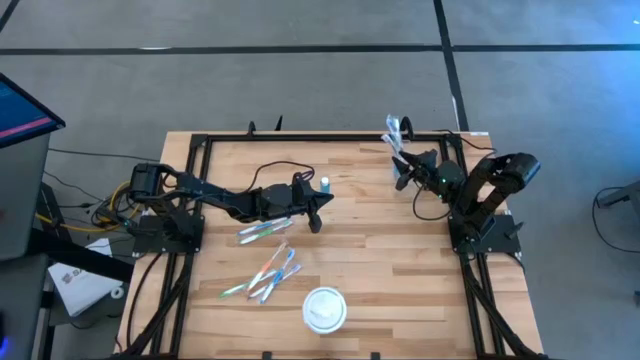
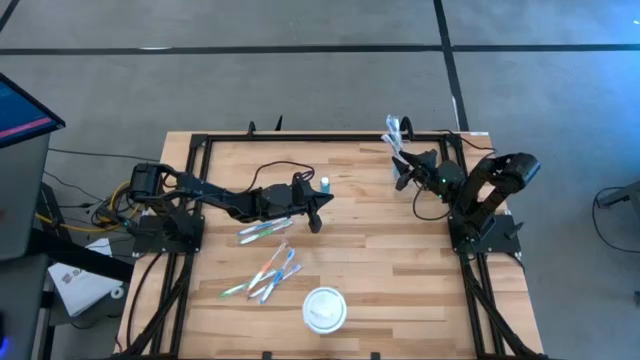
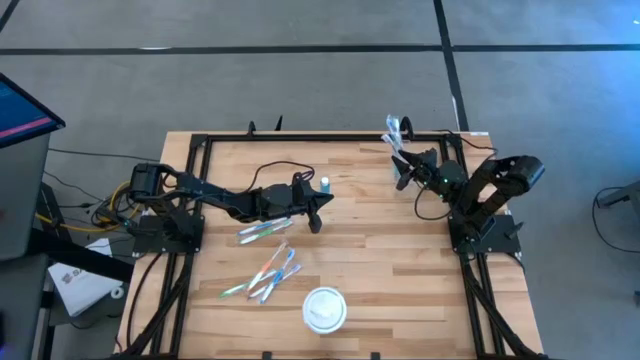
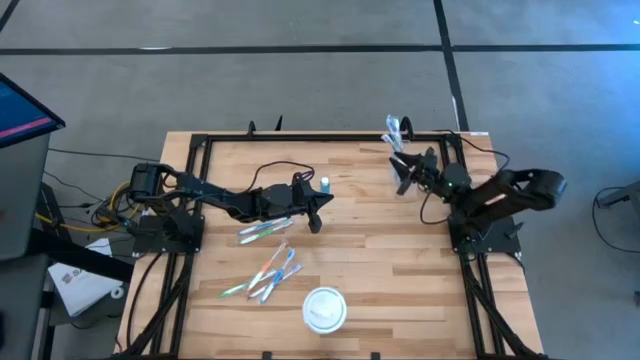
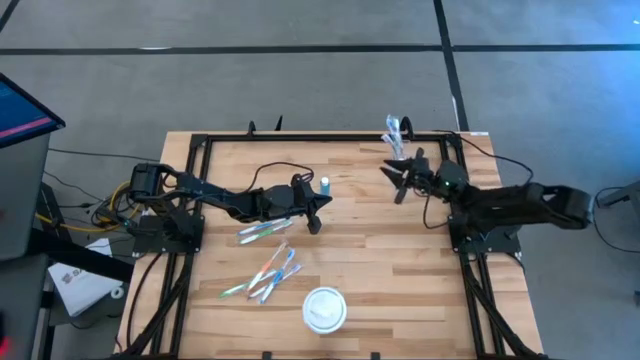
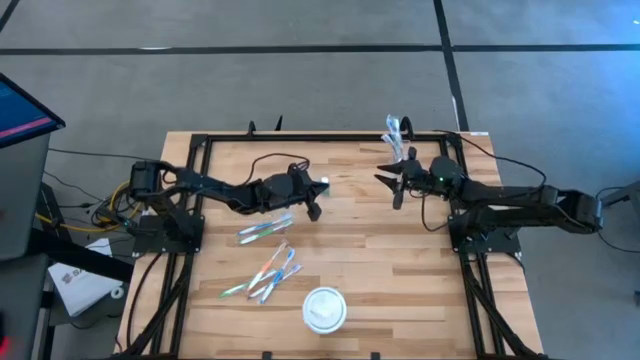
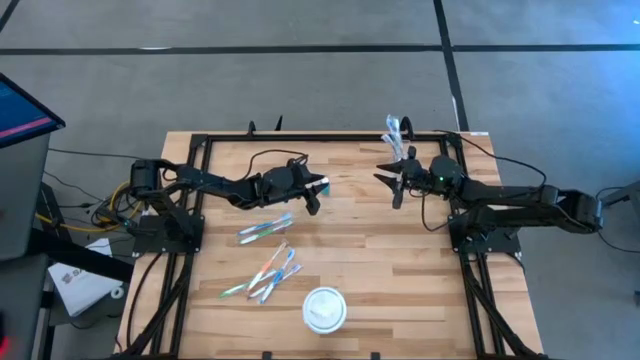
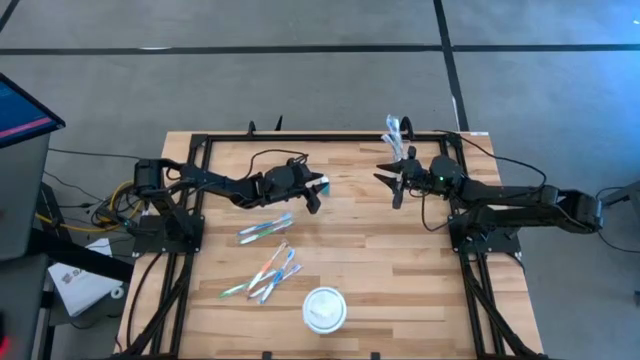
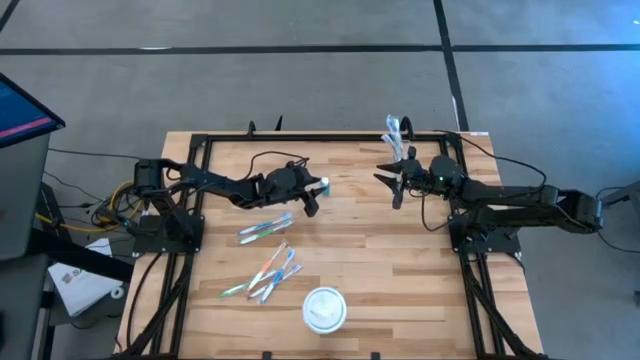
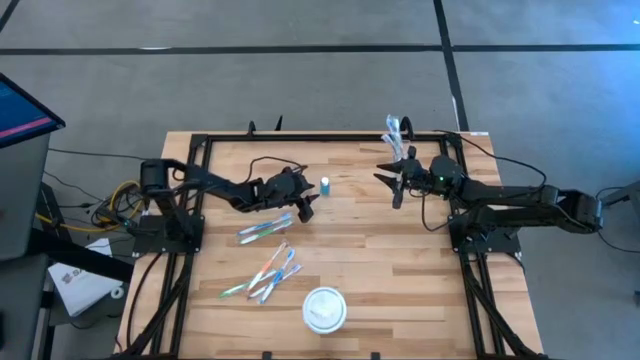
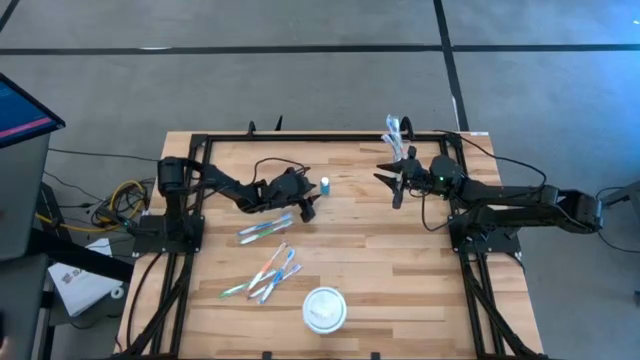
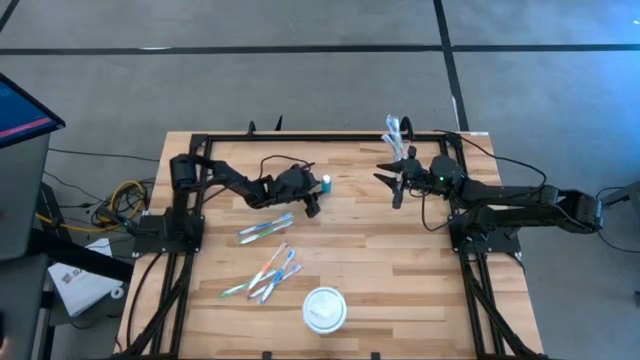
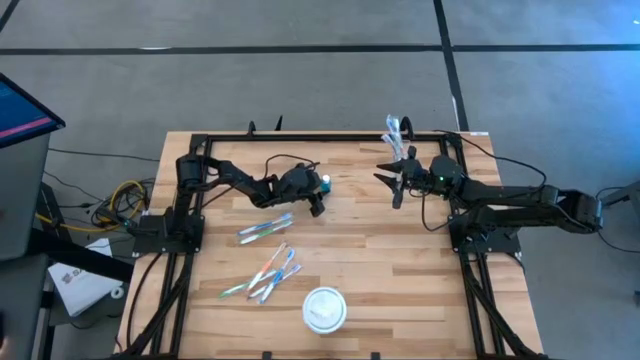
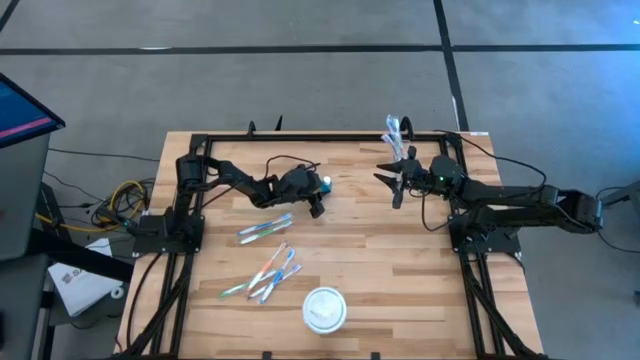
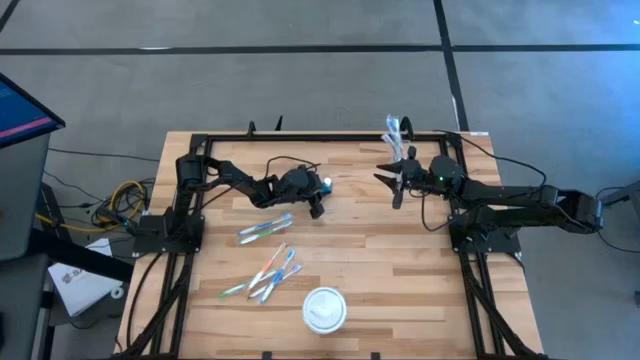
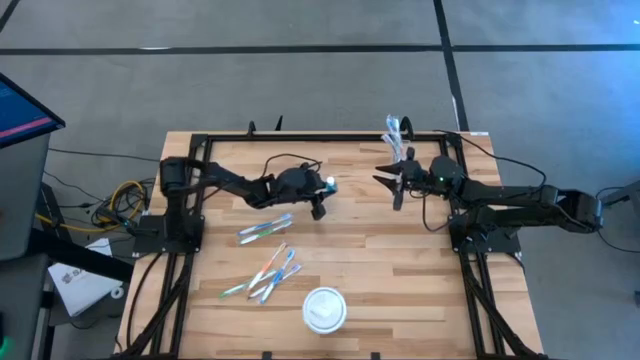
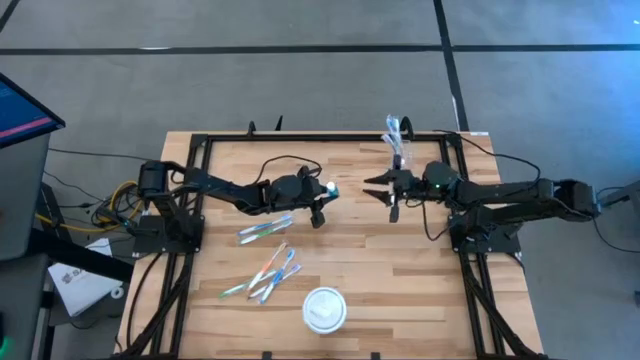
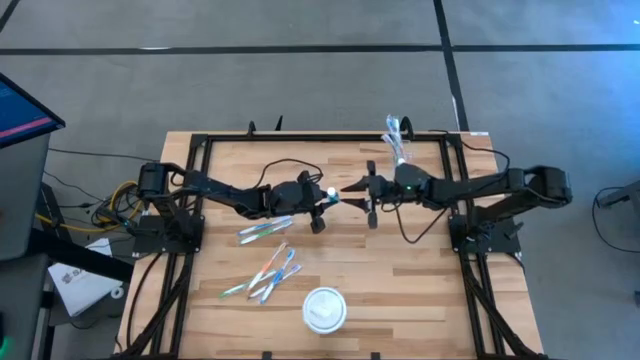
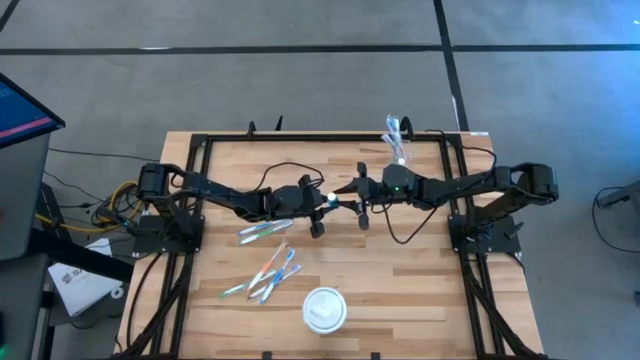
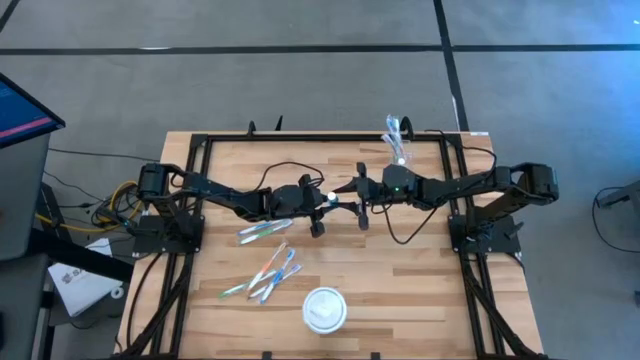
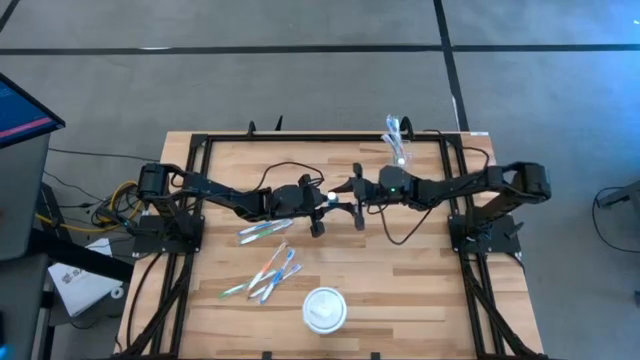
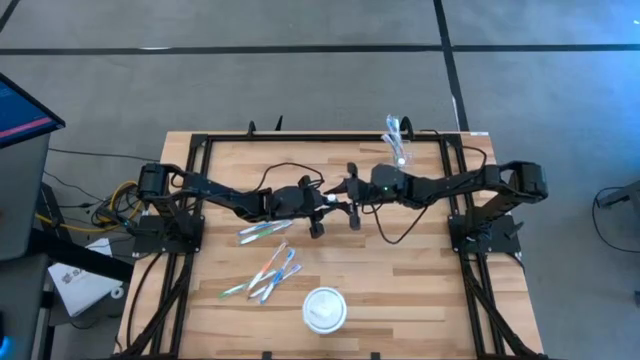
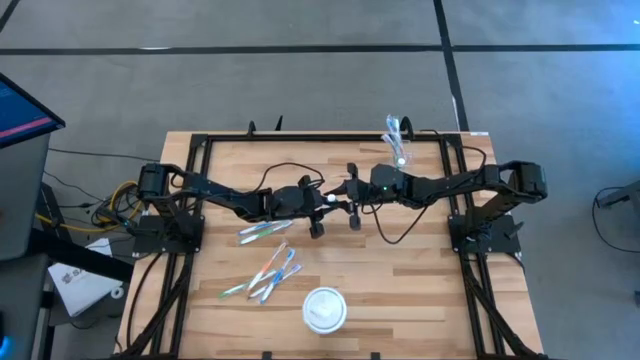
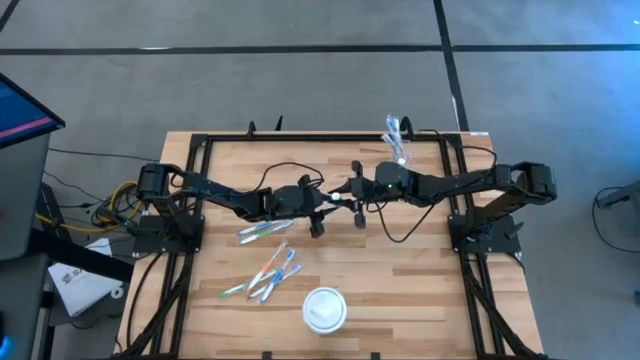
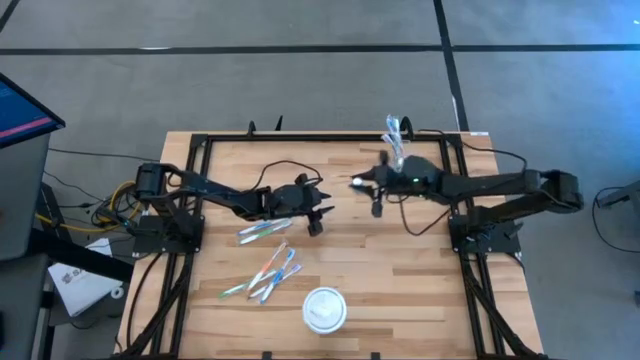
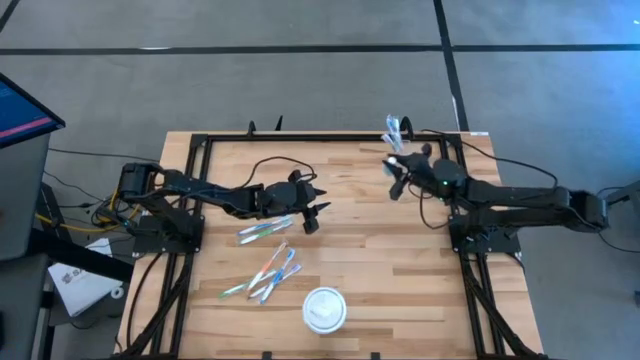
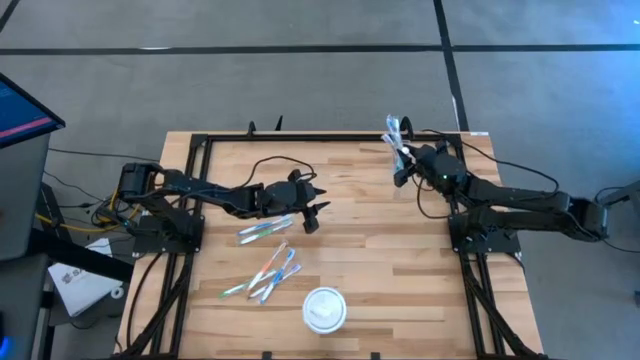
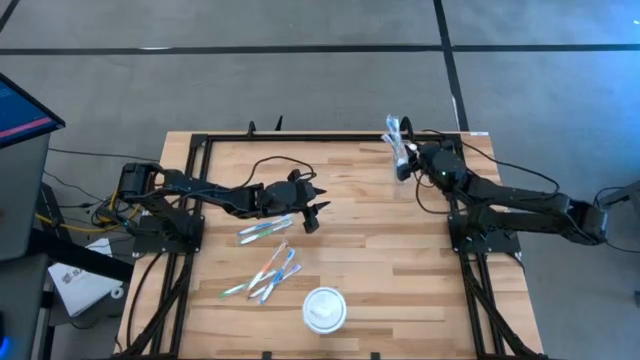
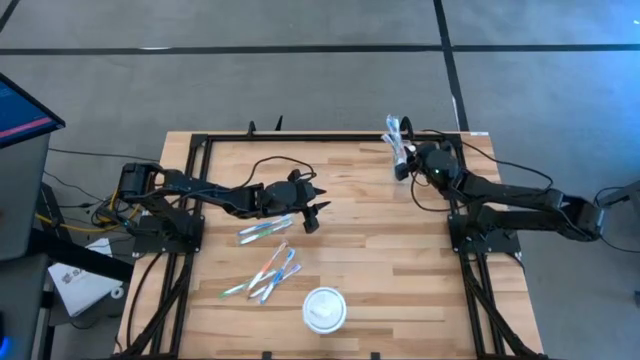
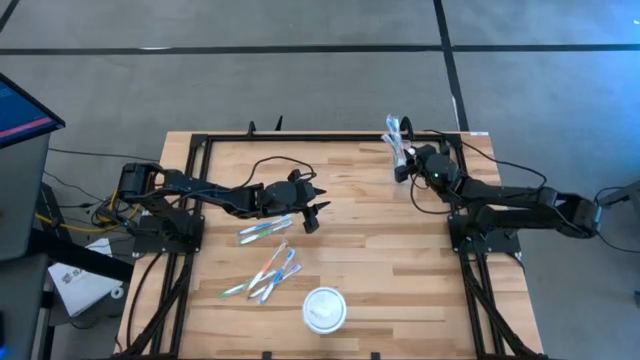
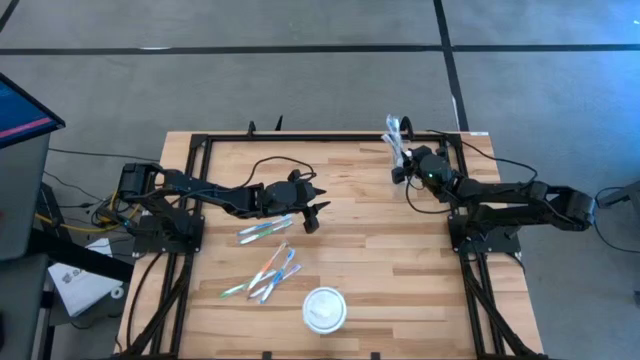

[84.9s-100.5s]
Task: Pick & Place toothbrushing station
Put the blue mouthwash into the transparent organizer

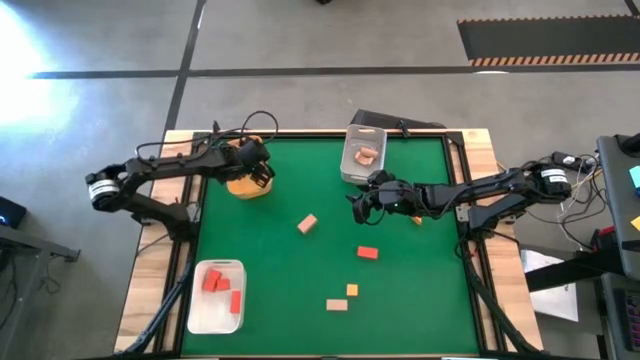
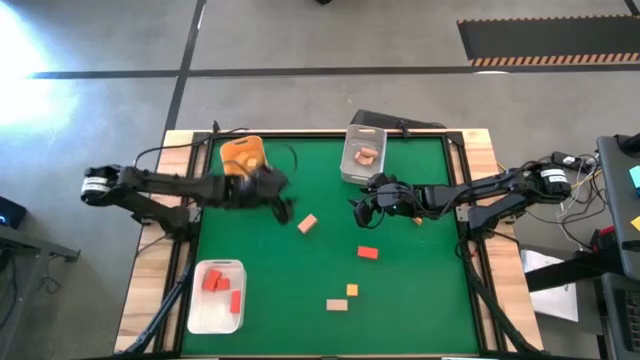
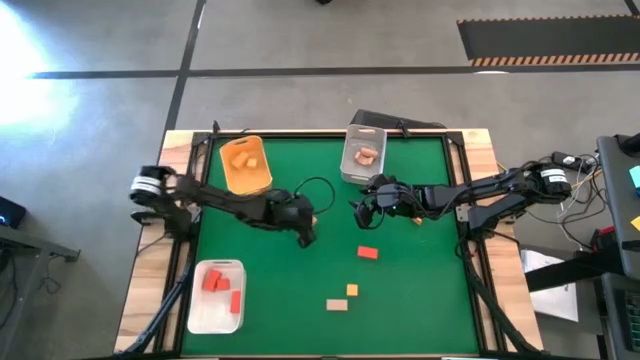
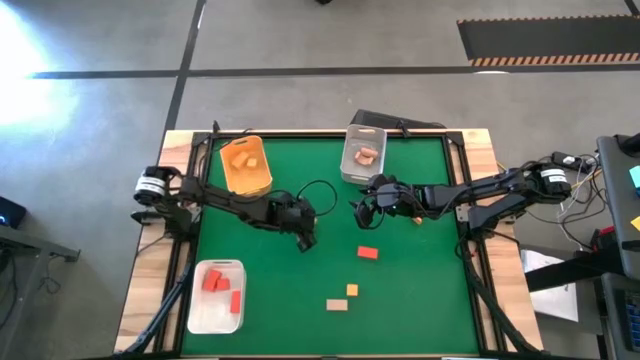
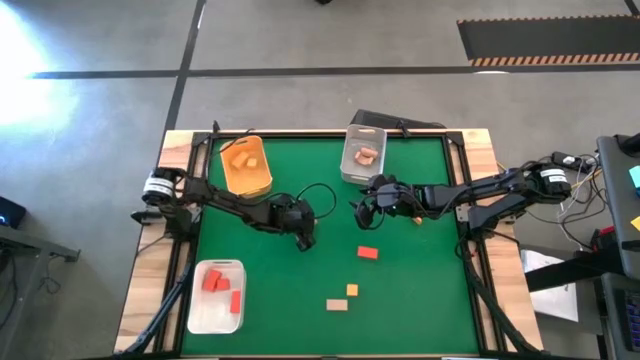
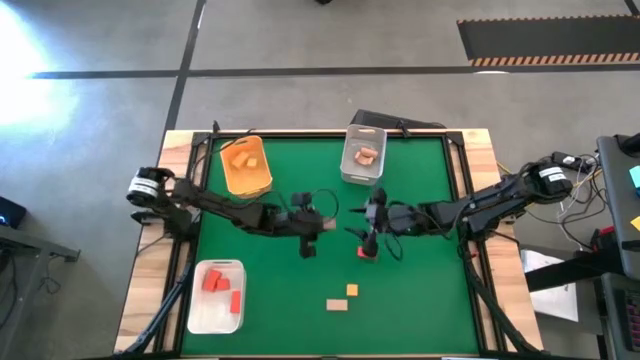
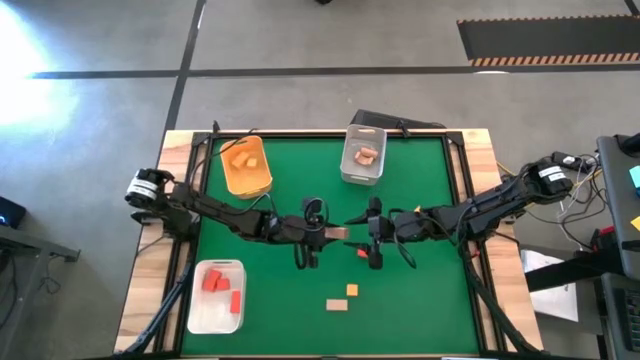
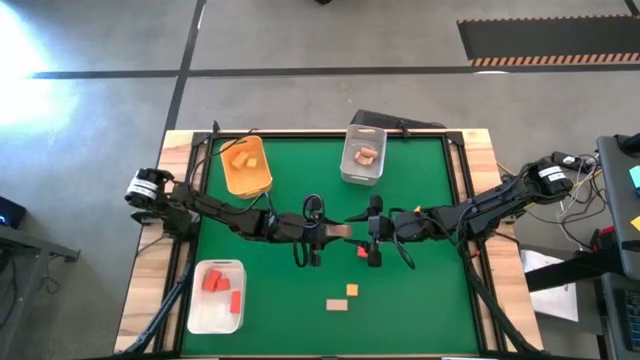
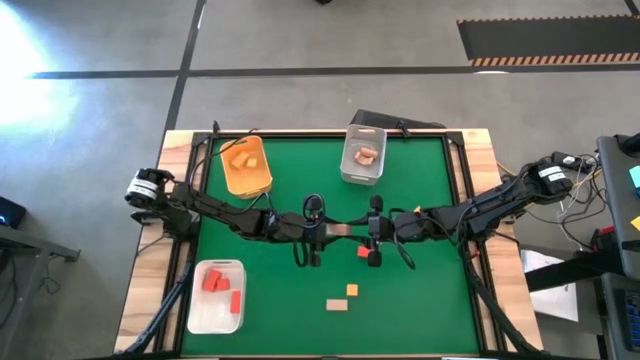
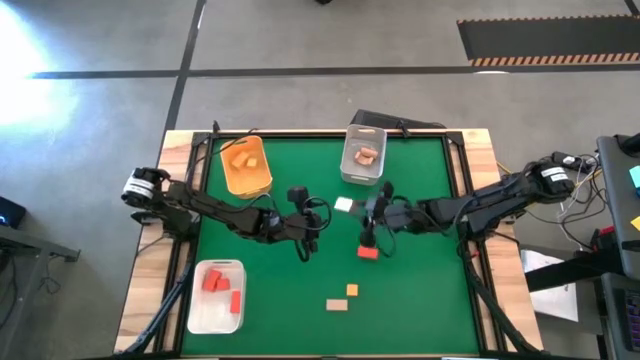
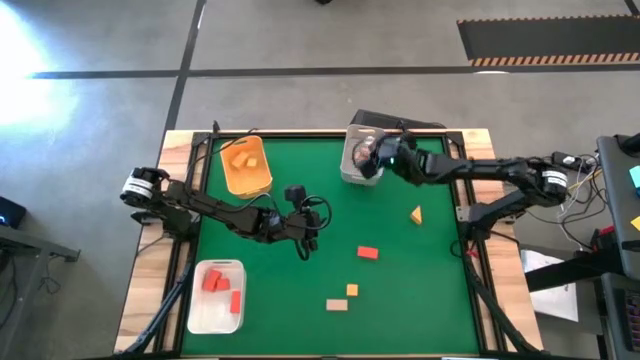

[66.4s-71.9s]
Task: Sort & place blocks by color
Put the brown block into the gray bin
